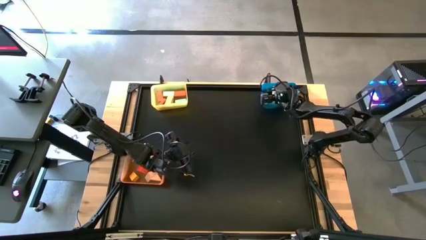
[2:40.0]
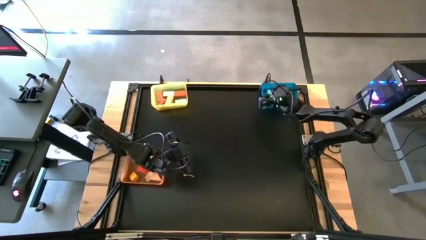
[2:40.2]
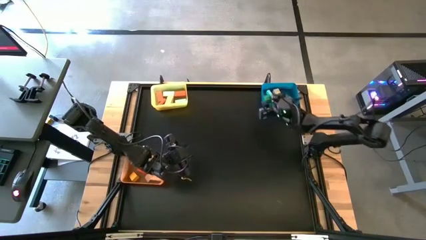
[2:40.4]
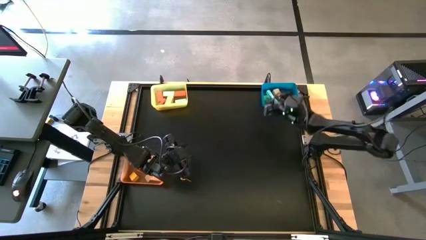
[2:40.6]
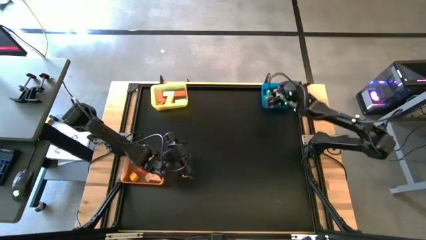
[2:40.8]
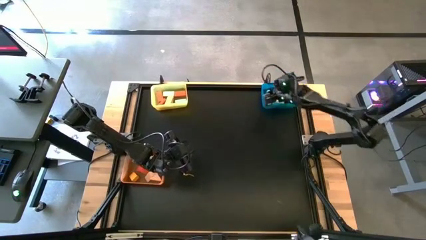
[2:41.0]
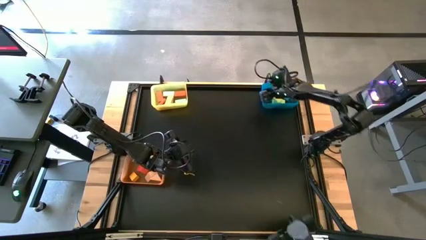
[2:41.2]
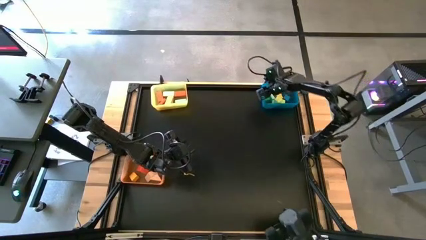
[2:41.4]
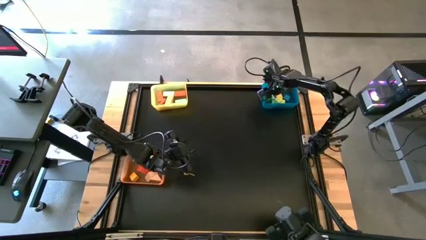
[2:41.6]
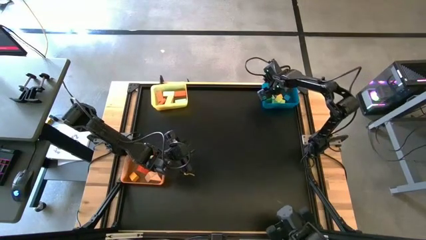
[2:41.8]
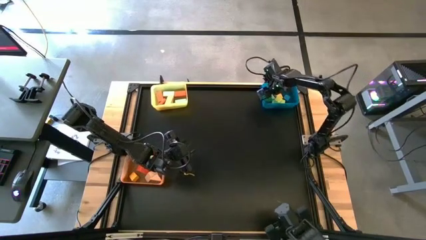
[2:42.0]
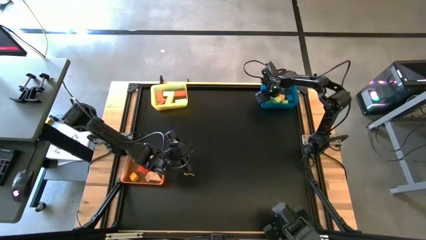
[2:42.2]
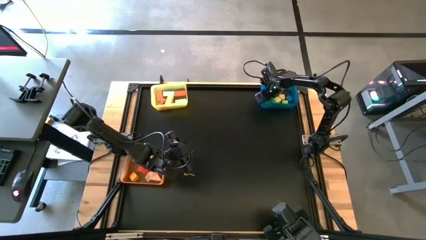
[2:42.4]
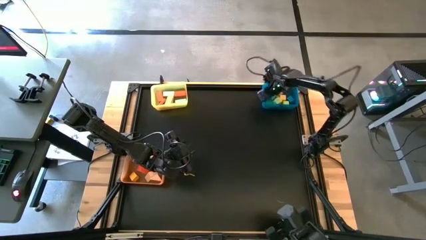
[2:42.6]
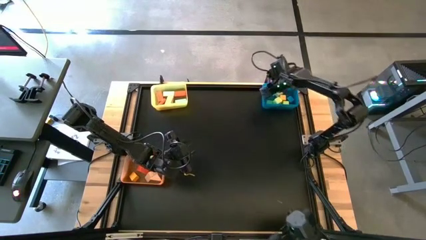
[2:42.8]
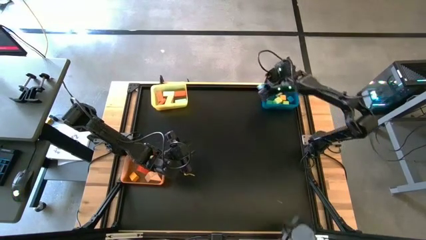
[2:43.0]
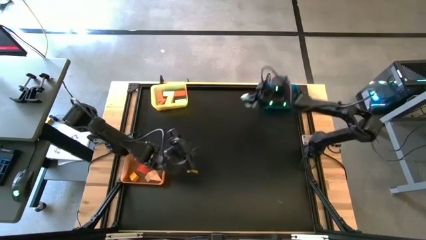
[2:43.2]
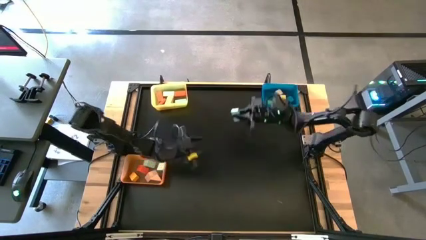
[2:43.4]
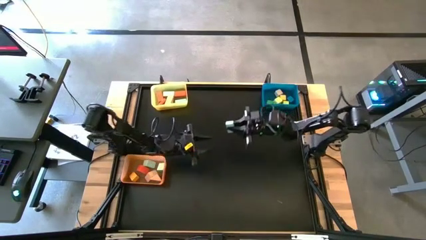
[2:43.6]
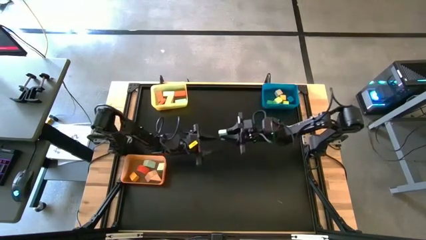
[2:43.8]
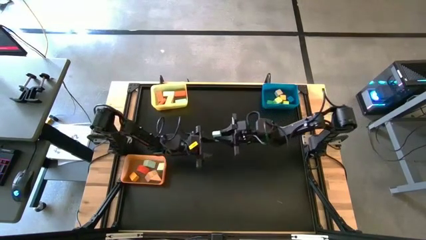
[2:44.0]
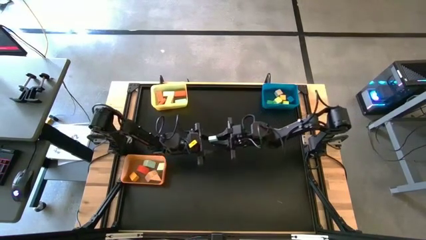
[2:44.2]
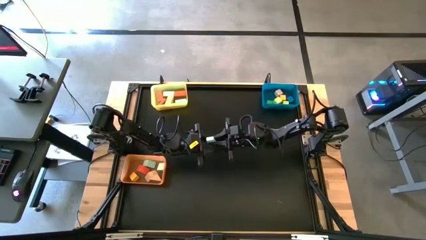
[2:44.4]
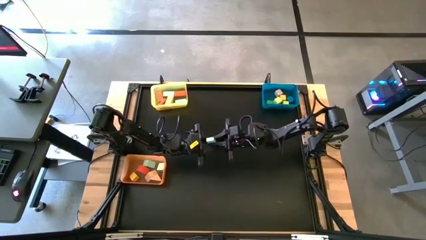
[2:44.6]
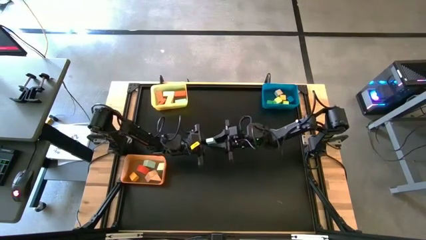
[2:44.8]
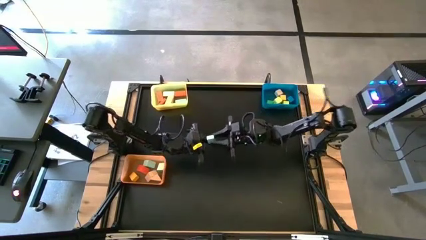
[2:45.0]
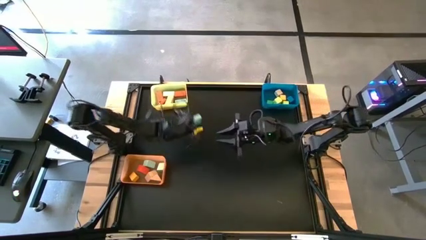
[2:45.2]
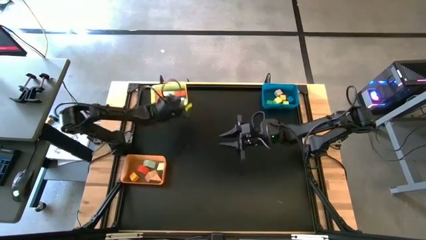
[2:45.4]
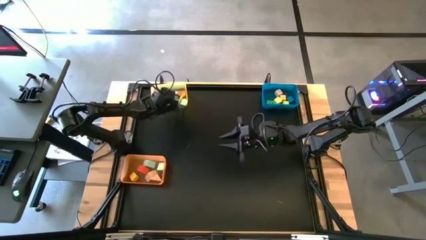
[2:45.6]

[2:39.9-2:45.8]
Task: Sort blocks by size
Put the light green wooden block into the yellow bin

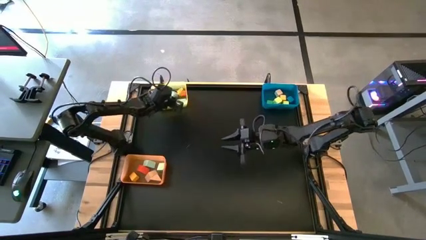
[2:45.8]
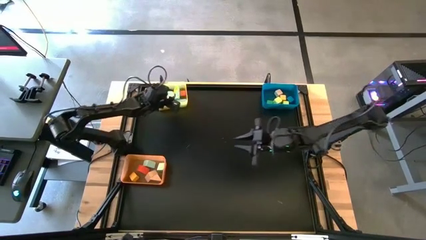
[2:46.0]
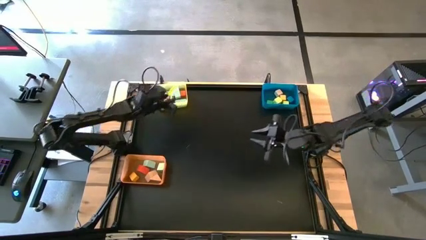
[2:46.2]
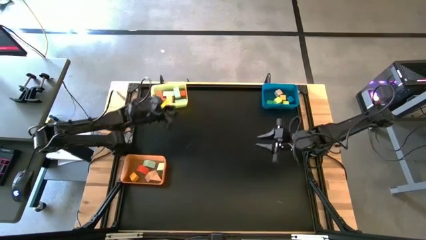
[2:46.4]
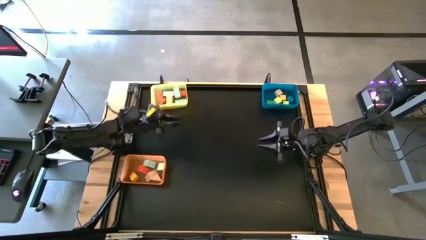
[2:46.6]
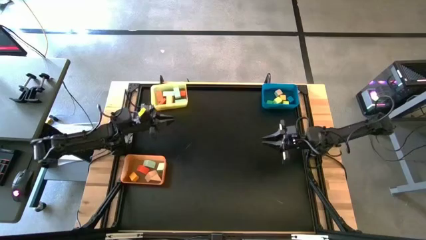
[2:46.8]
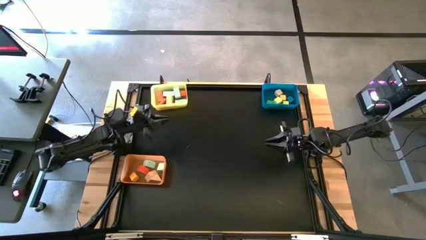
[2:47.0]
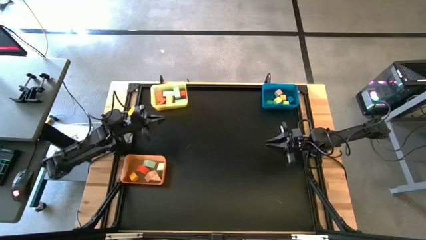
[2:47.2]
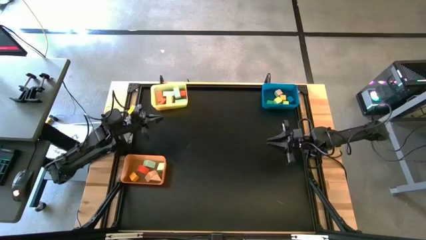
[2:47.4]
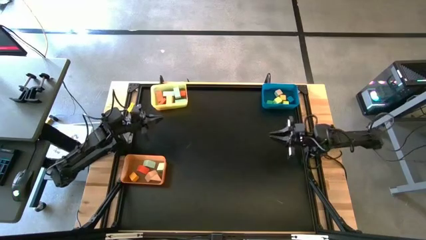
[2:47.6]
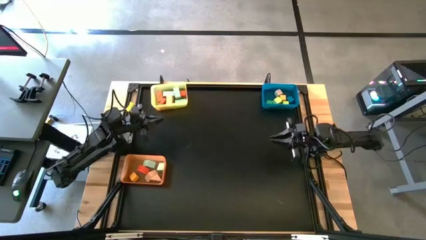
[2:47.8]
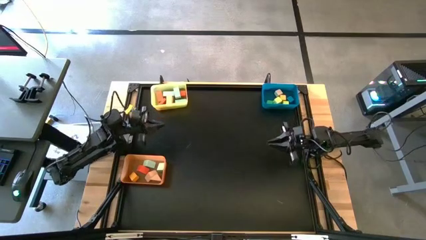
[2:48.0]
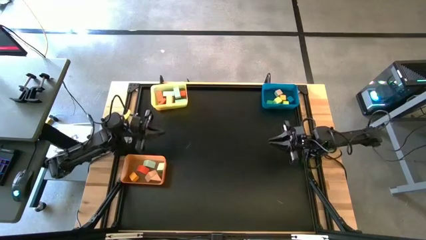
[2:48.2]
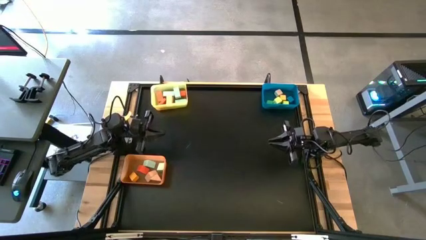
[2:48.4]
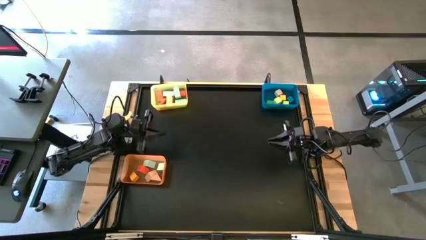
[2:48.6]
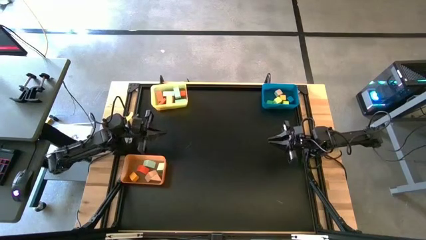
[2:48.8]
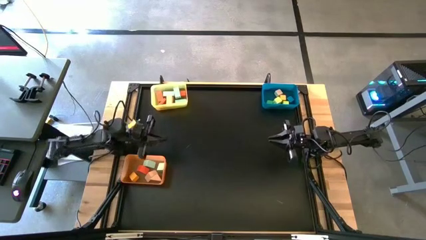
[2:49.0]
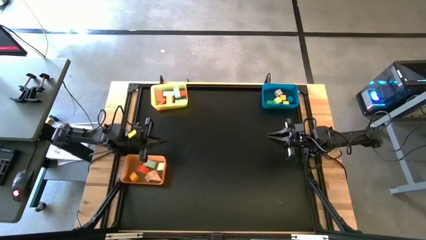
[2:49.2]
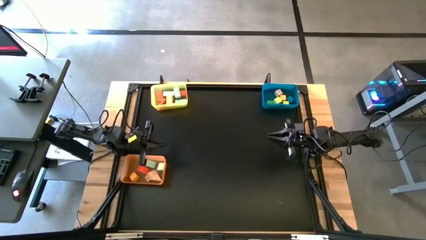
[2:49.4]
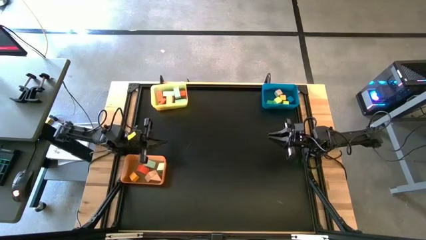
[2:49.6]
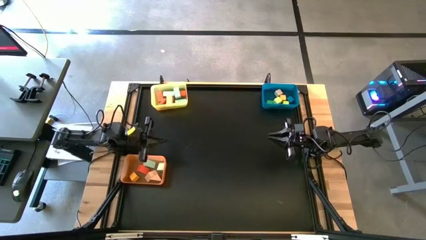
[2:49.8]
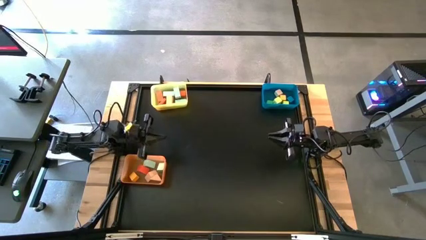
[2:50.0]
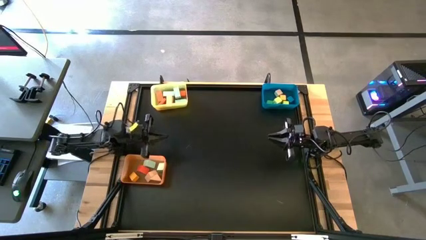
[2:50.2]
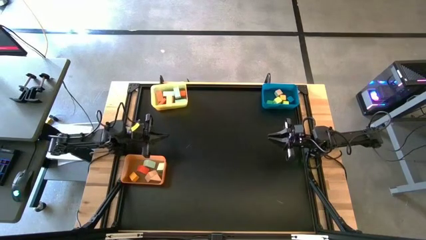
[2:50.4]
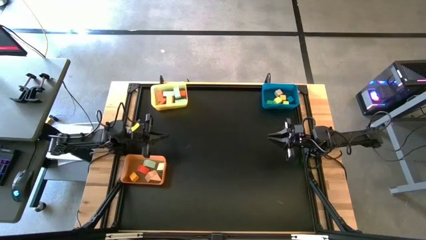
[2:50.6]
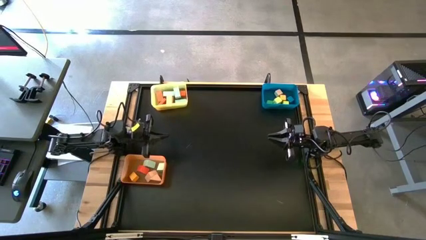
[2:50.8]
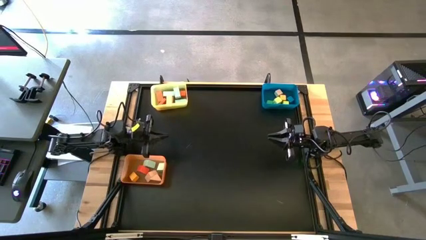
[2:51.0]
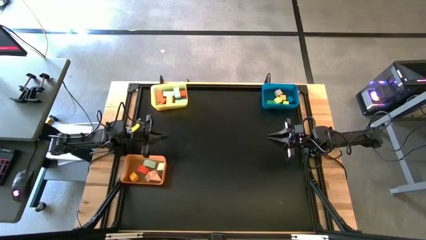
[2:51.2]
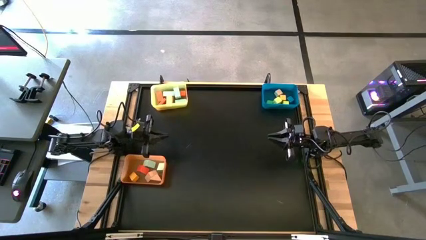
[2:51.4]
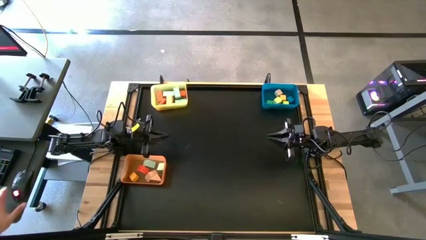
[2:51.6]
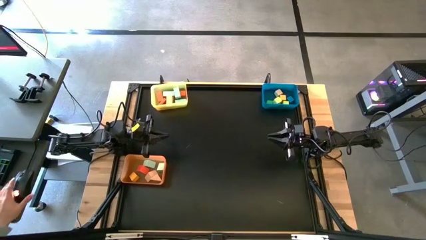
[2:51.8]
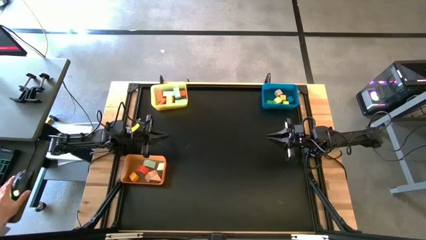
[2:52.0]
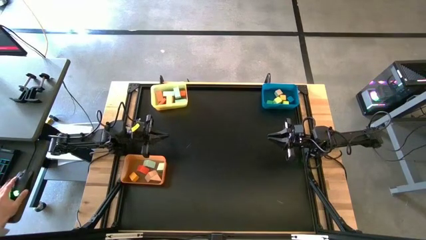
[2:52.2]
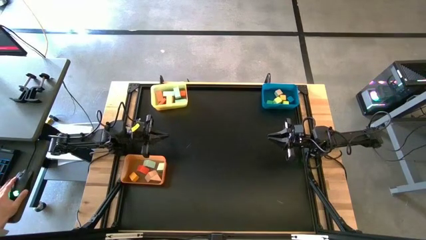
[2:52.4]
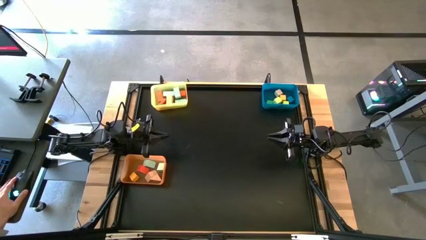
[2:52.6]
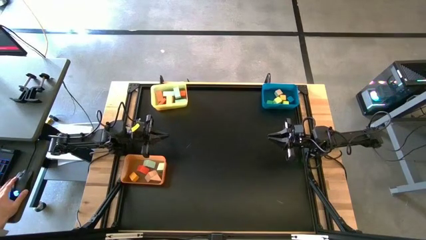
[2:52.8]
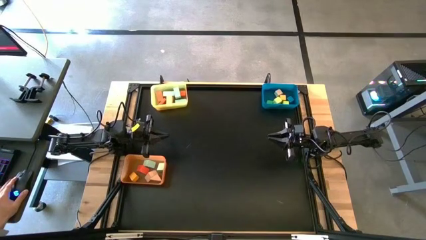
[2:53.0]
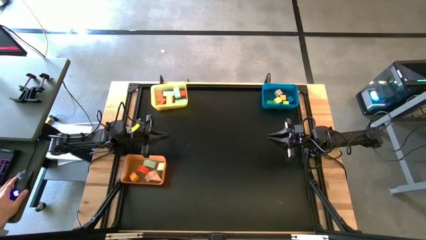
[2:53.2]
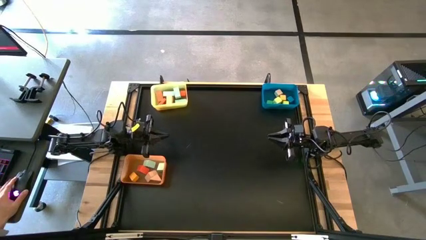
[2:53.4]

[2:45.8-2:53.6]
Return to Home Position

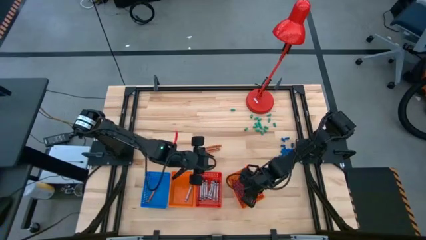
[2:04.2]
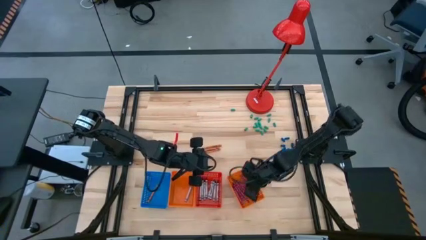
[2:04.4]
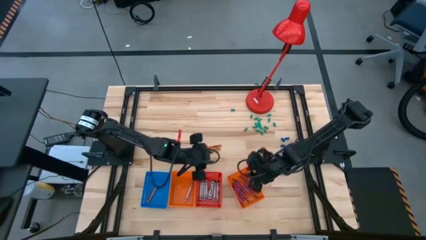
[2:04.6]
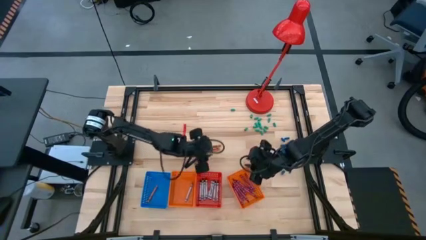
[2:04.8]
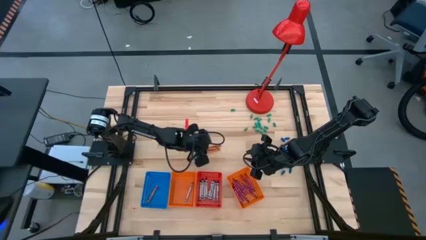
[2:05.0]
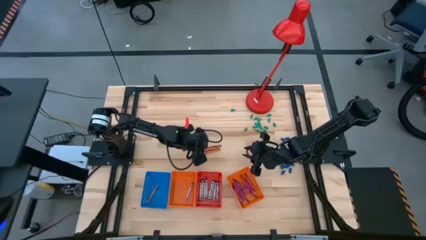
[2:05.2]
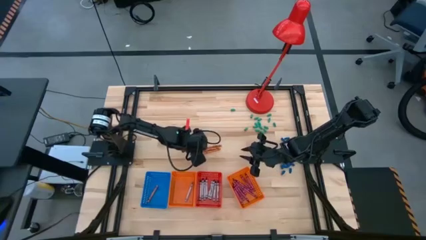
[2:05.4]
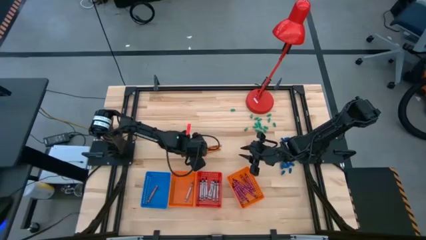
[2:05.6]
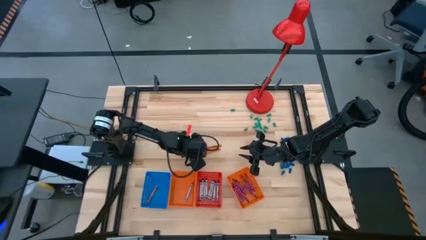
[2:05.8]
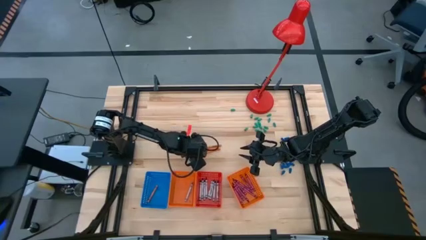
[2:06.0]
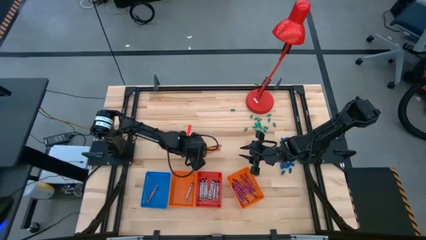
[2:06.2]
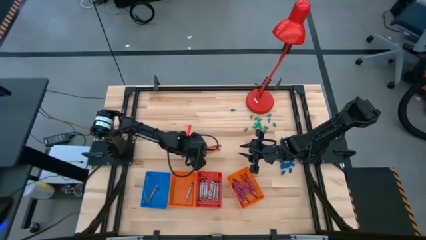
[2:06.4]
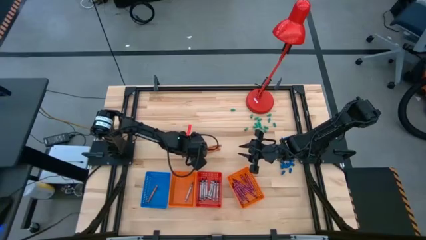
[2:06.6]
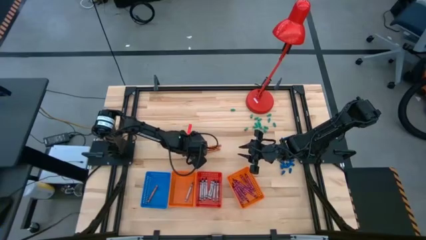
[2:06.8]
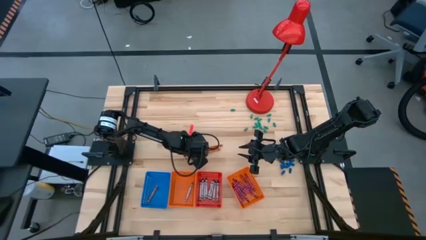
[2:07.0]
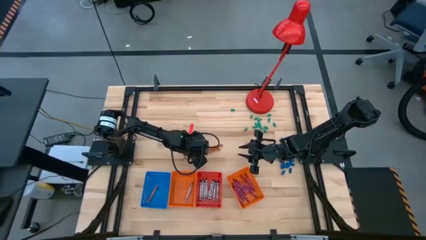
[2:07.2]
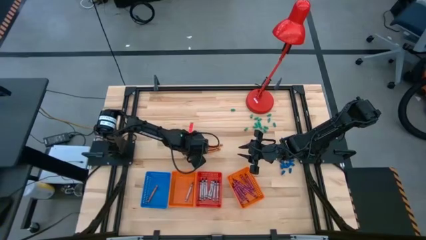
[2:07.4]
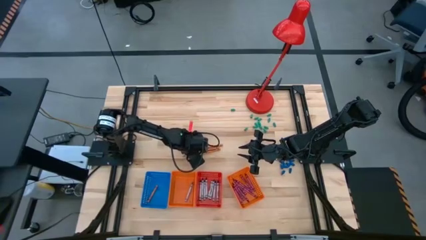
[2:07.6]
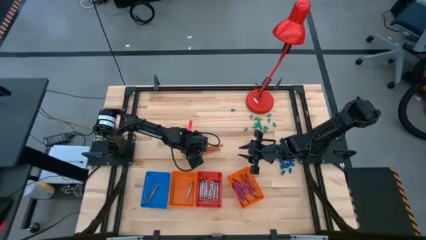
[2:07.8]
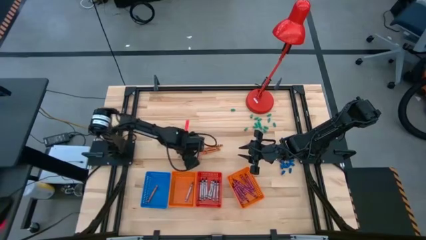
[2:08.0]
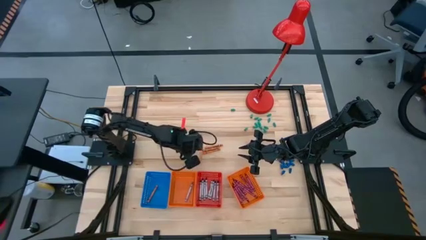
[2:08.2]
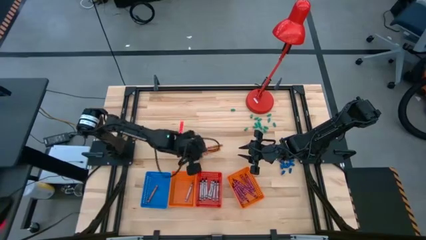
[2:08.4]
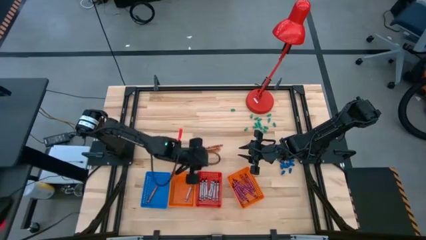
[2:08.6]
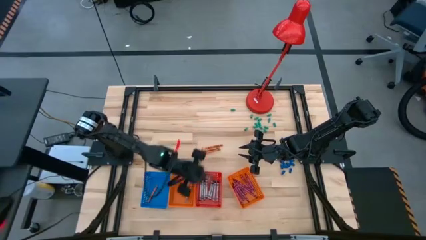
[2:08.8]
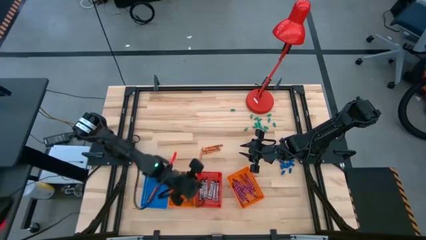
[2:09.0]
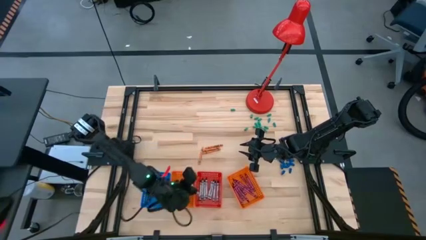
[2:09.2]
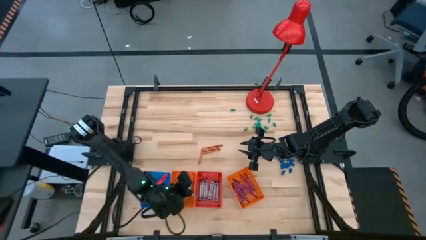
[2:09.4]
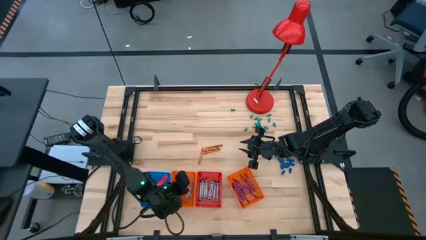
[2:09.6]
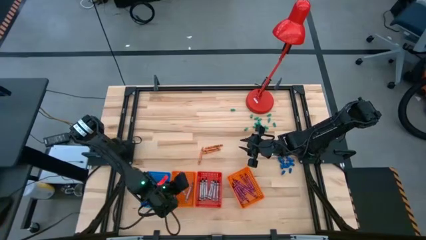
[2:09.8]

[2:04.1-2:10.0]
Task: Sort crayons
Put the gray crayon into the right orange bin
